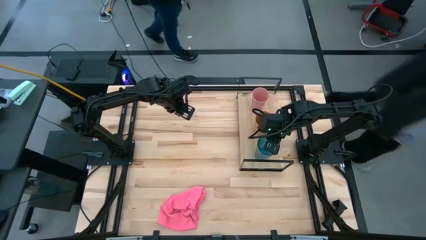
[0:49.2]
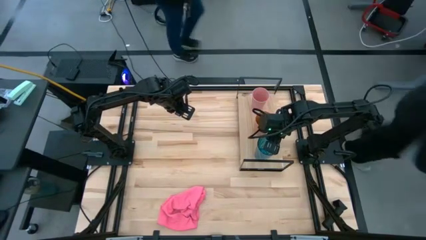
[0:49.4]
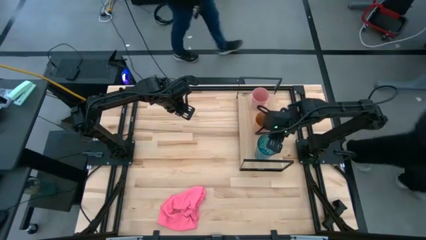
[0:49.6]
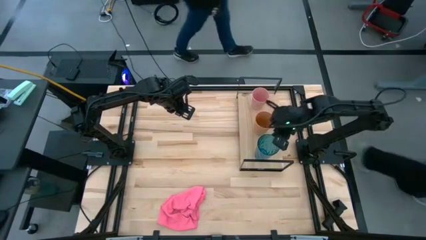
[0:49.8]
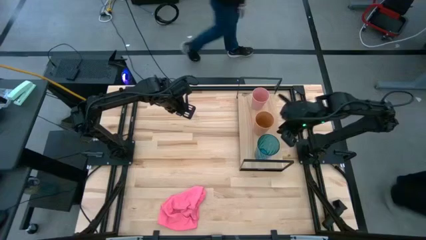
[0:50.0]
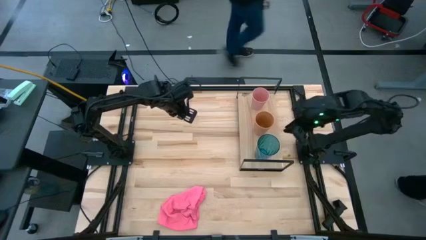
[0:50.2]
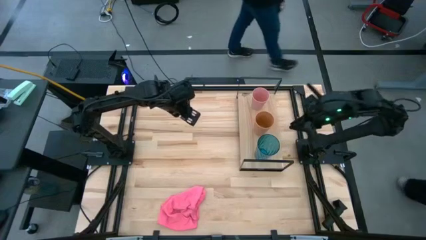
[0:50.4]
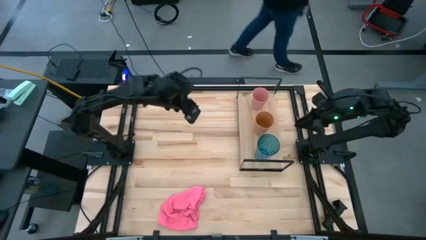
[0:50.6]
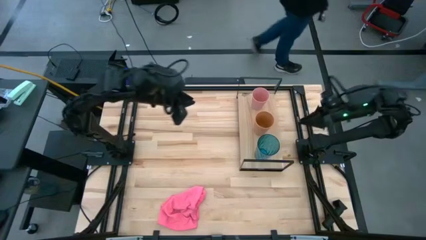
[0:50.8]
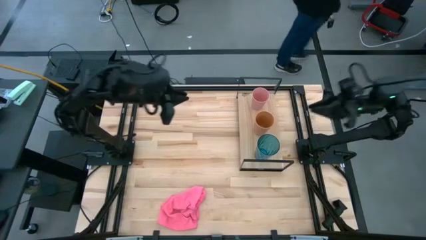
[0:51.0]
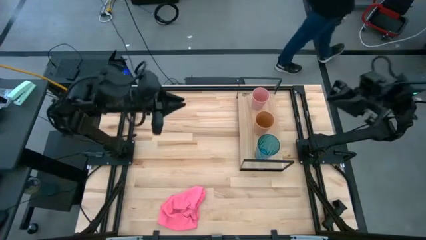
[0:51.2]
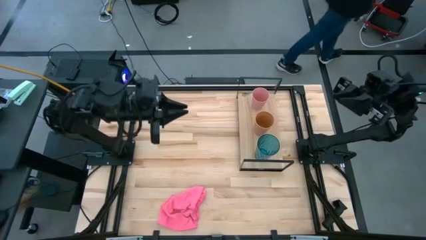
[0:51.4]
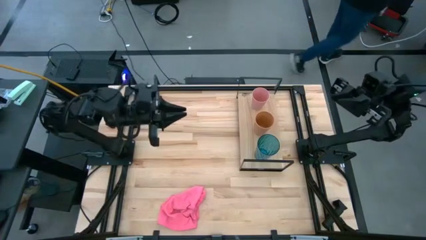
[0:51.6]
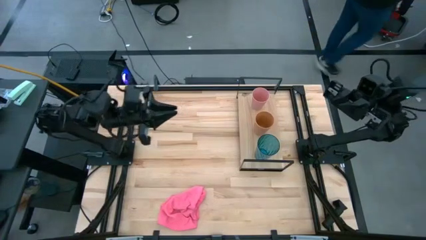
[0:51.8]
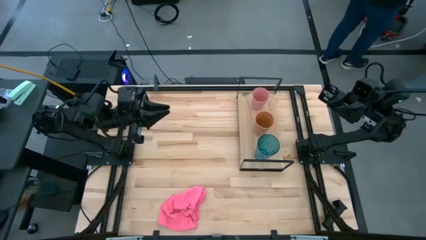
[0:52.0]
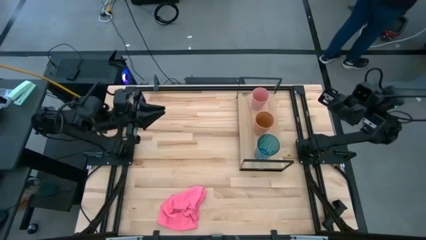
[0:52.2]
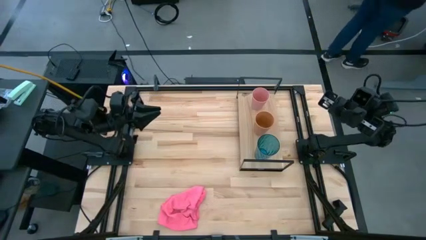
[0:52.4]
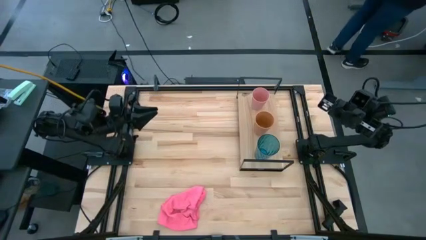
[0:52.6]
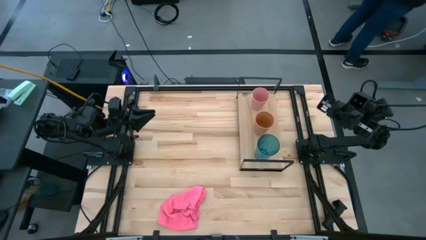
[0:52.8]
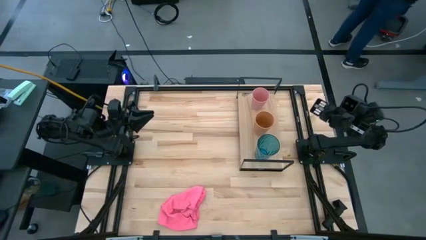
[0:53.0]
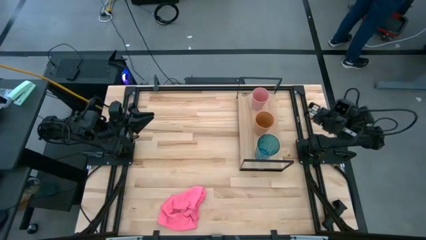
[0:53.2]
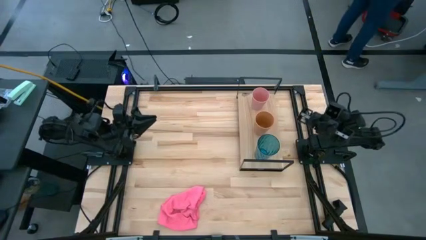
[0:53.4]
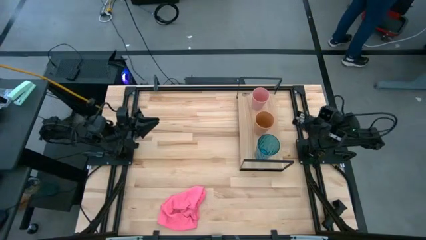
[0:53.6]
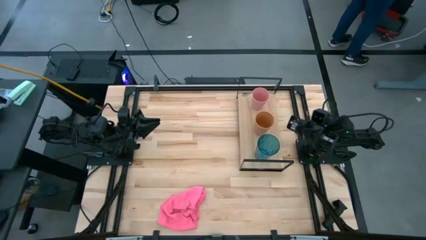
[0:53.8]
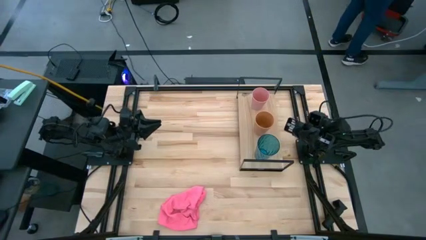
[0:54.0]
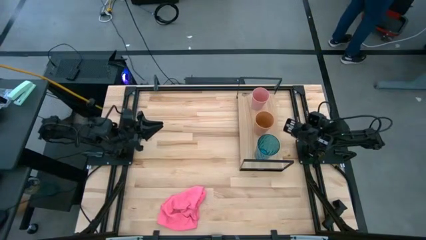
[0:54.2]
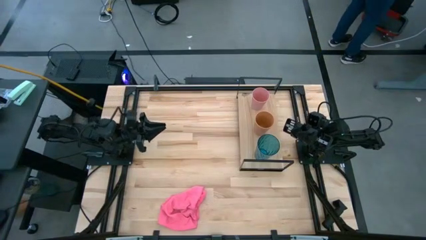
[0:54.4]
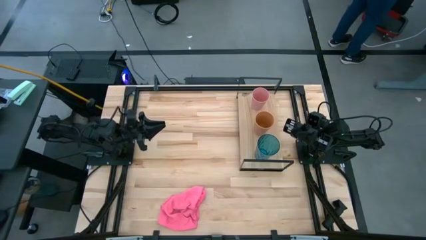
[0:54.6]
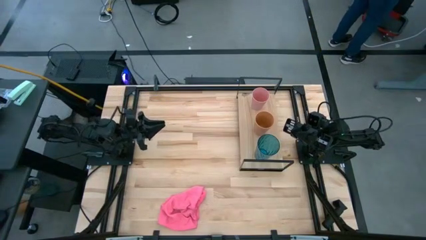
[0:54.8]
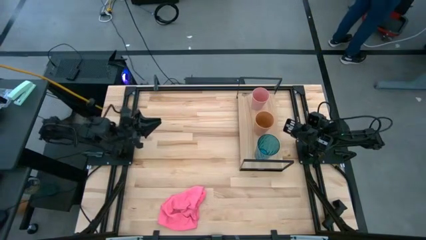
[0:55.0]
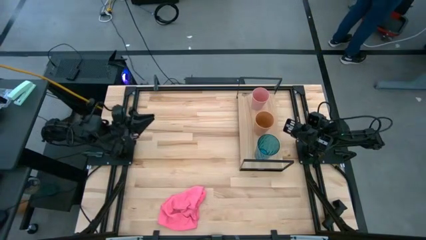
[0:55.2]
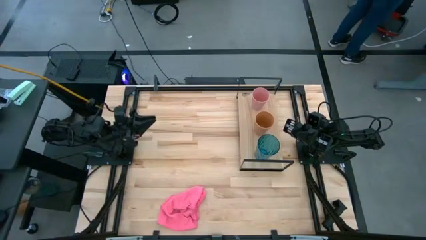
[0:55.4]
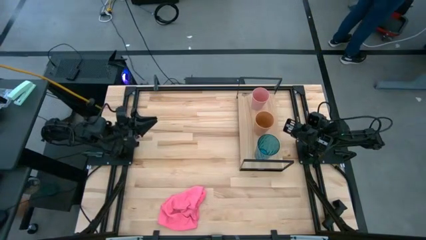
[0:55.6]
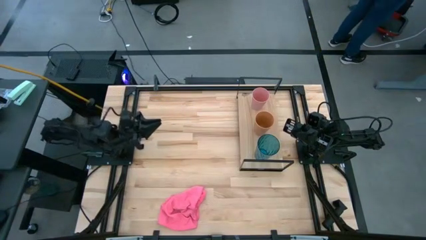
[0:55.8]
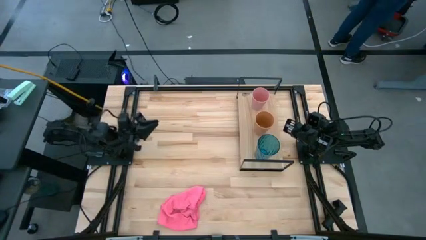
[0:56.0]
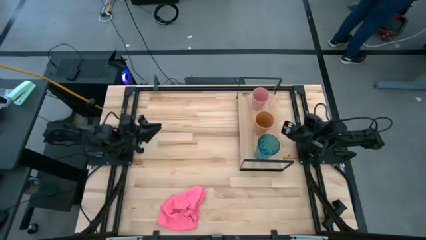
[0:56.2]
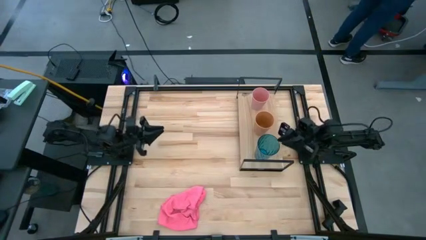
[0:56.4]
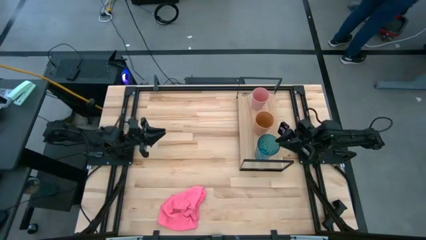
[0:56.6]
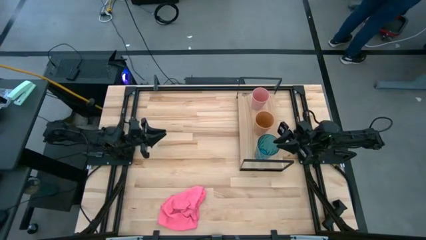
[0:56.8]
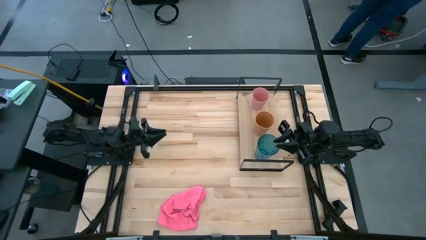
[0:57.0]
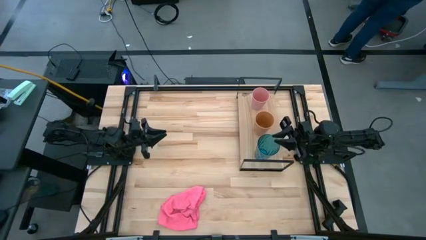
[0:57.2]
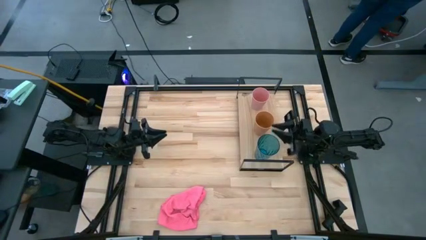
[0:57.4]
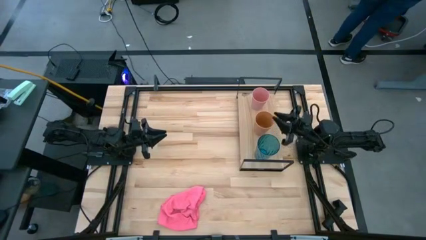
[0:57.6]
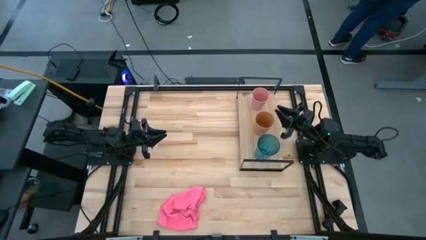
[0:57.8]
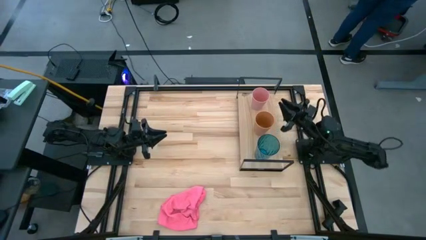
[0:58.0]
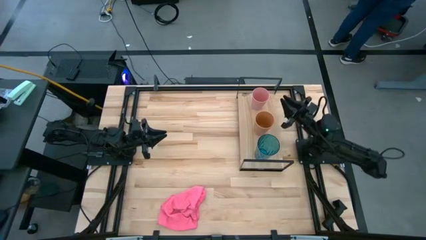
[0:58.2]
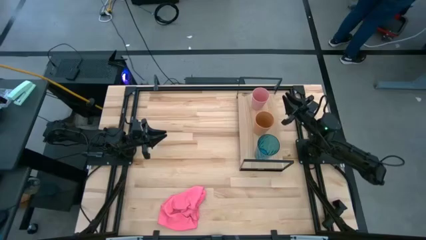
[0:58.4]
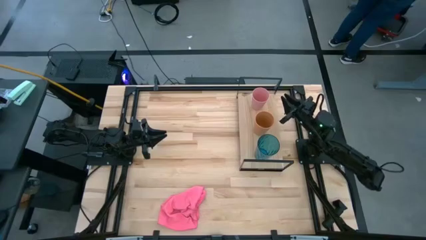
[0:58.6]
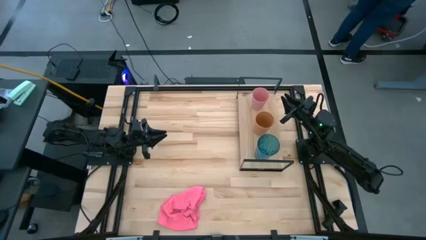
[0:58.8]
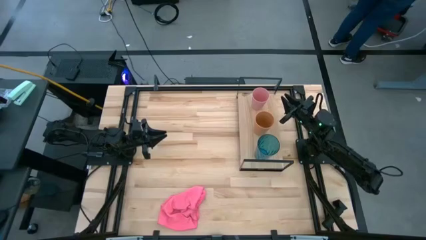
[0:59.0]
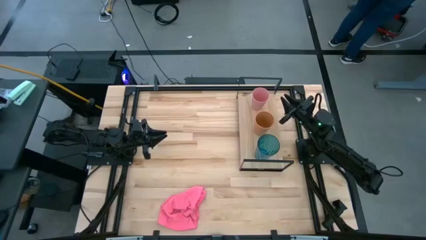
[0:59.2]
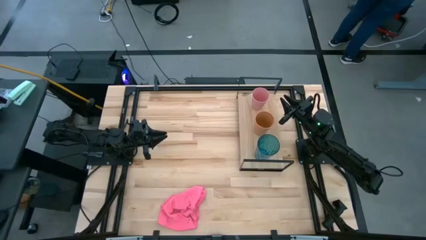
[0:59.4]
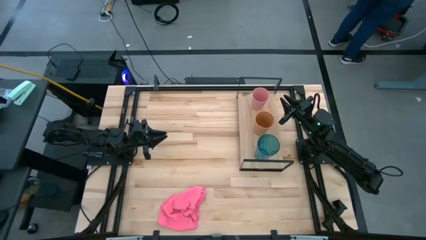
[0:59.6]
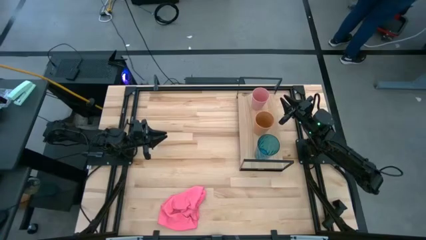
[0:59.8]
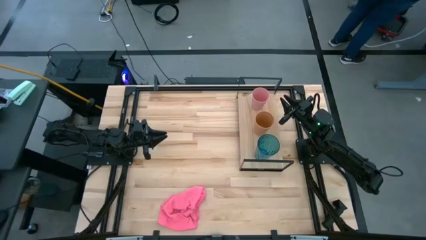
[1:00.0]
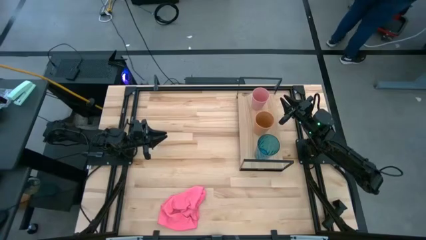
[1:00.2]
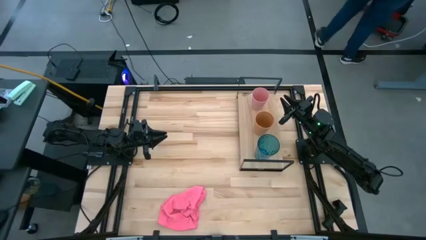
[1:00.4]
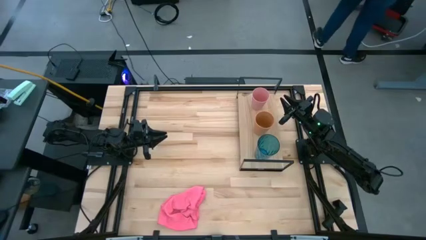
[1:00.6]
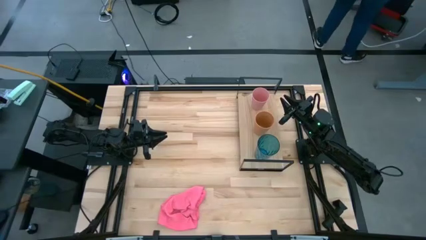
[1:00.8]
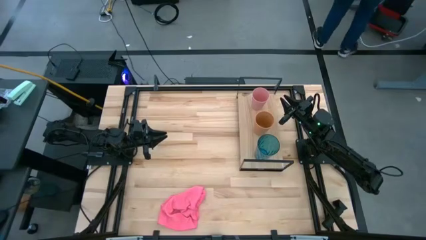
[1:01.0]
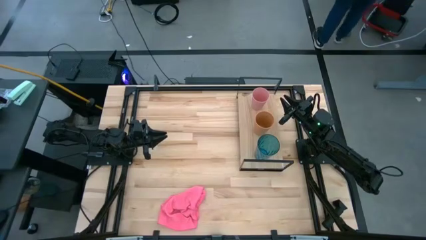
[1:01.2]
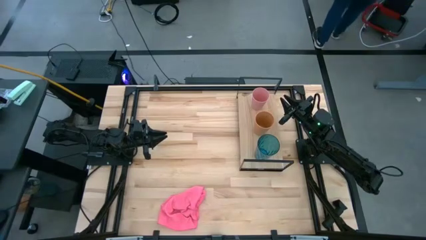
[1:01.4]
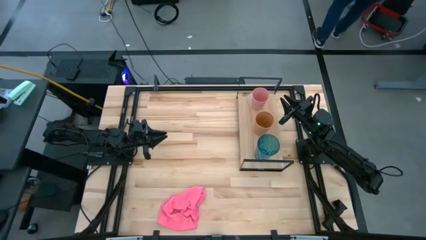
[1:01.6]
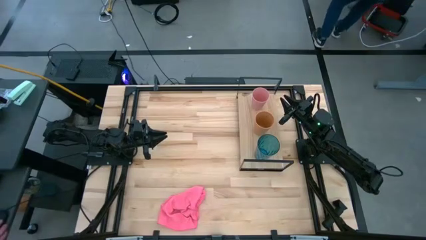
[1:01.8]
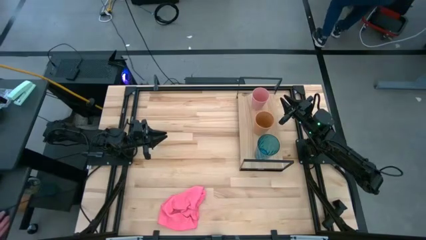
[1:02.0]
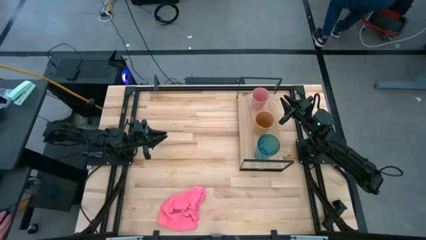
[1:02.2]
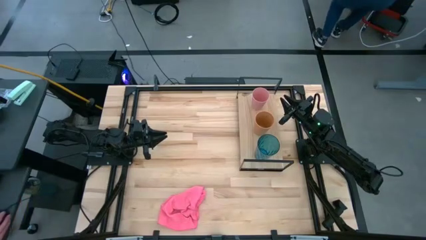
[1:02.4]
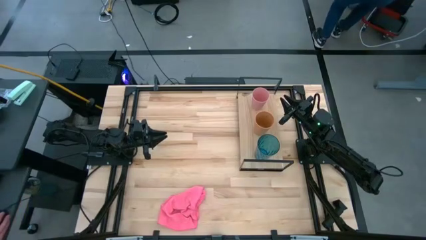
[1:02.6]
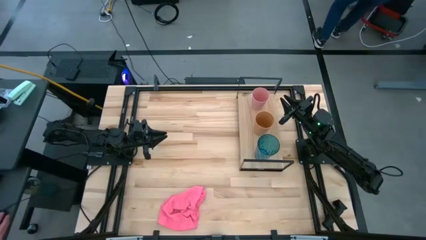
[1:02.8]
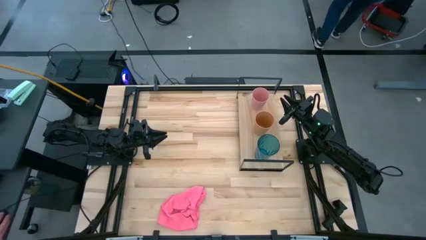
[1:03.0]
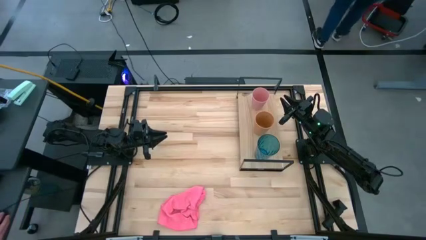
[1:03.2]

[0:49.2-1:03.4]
Task: Stack small to large cups/mugs on shelf
Return to Home Position
